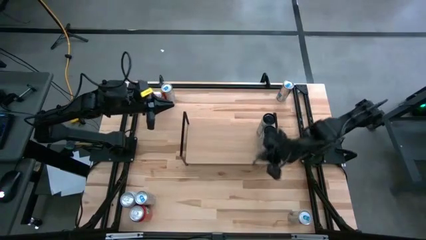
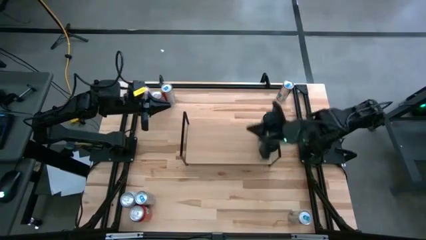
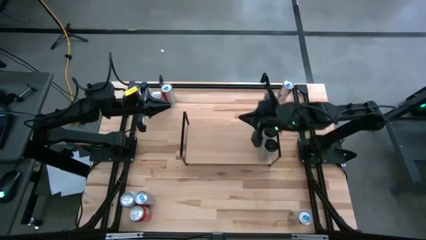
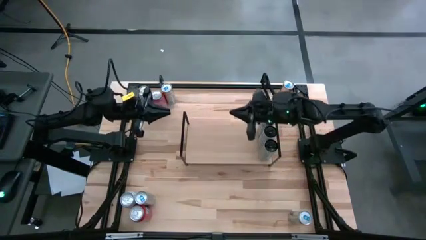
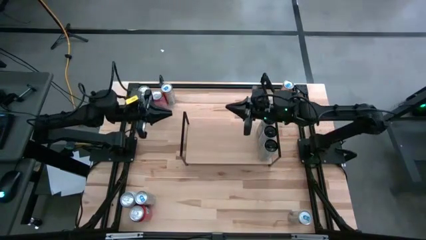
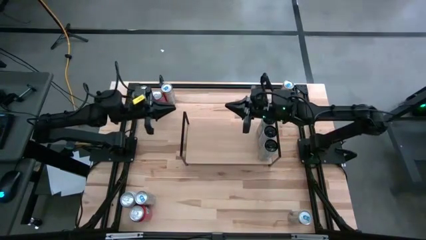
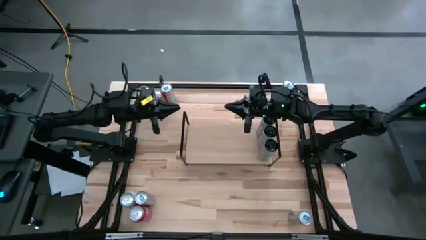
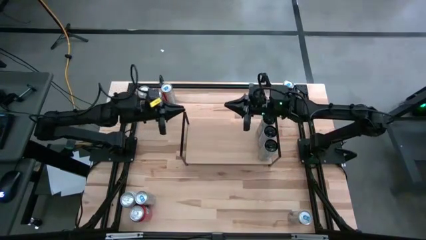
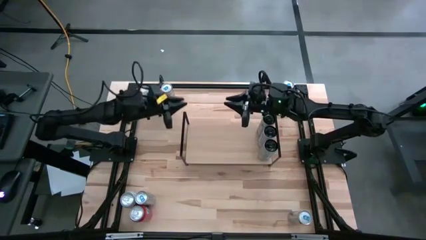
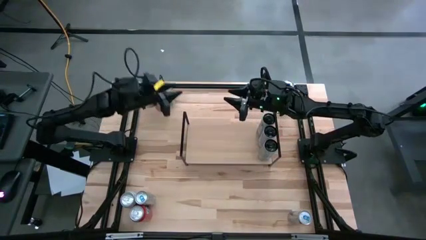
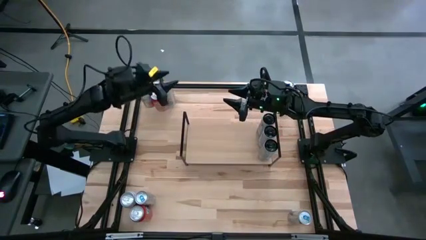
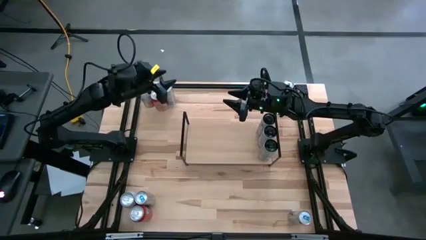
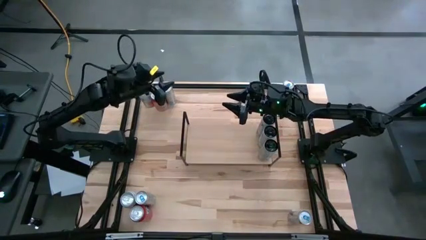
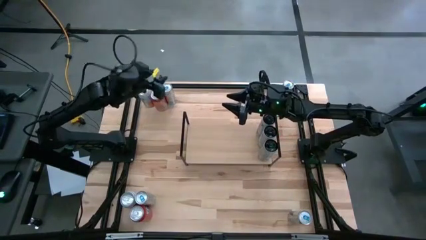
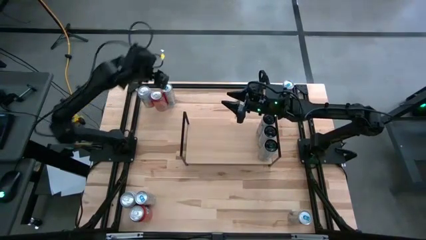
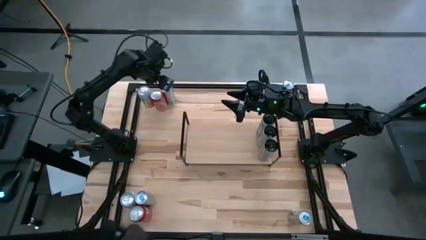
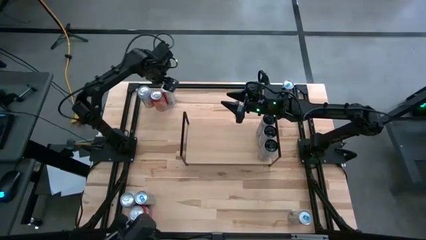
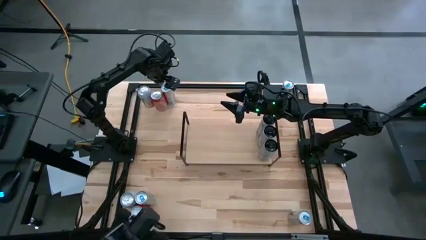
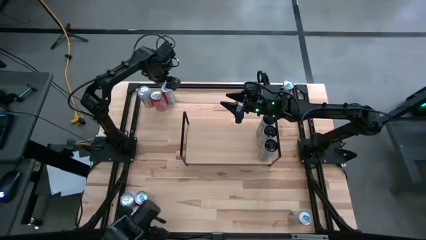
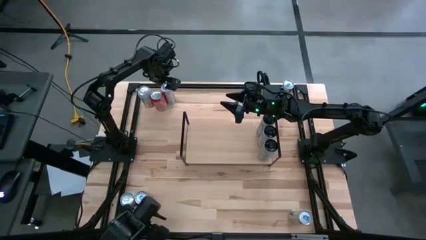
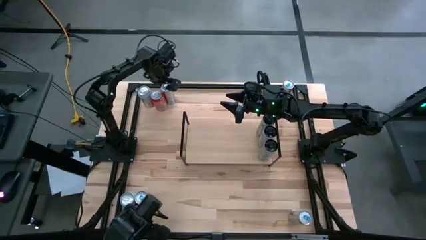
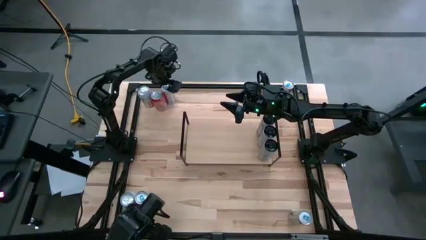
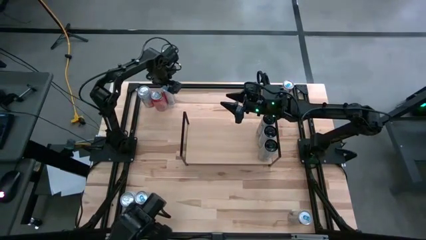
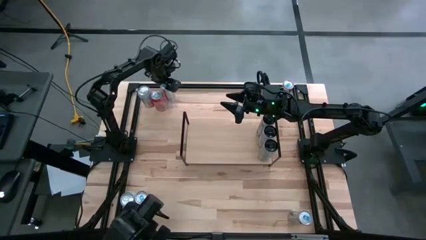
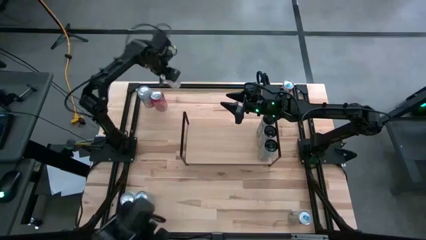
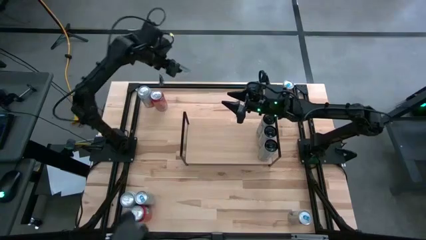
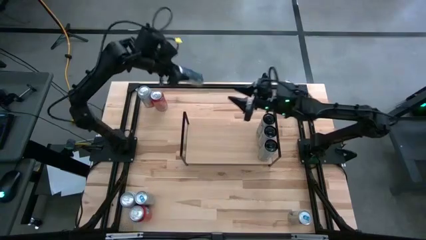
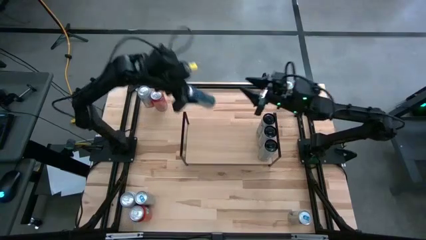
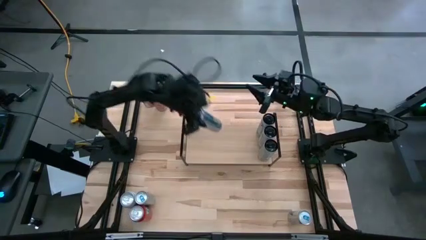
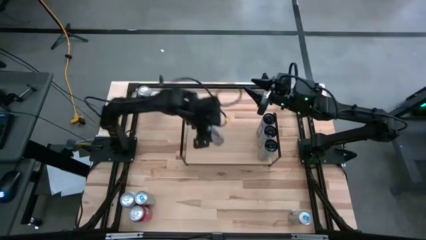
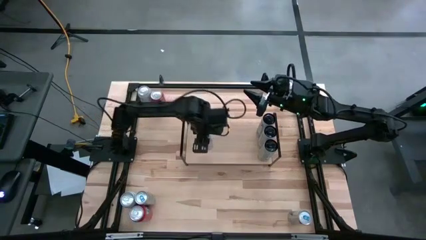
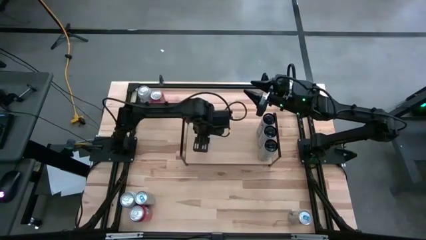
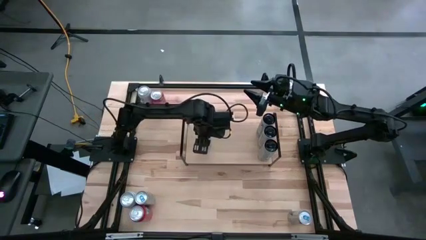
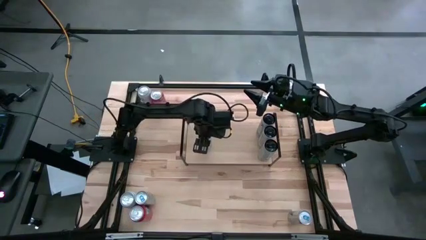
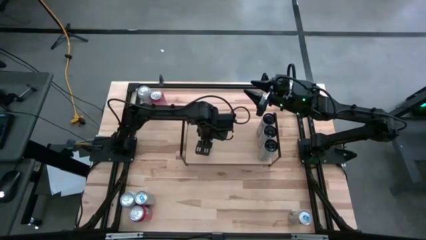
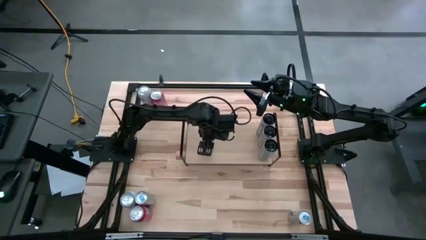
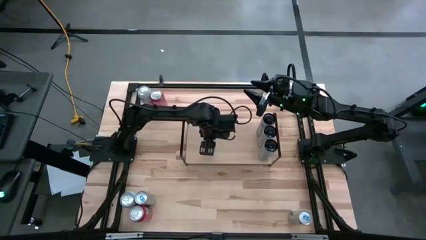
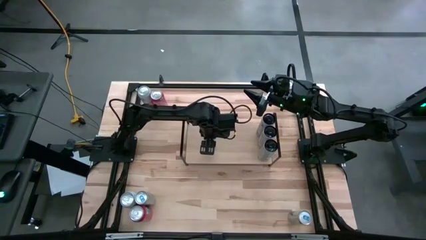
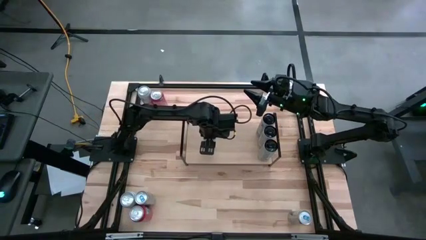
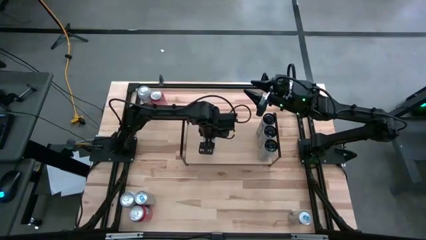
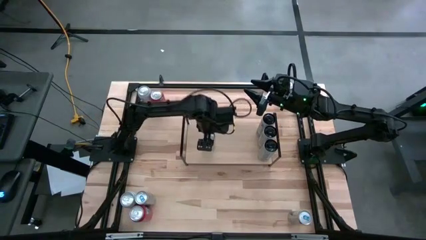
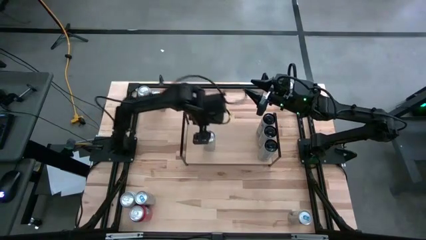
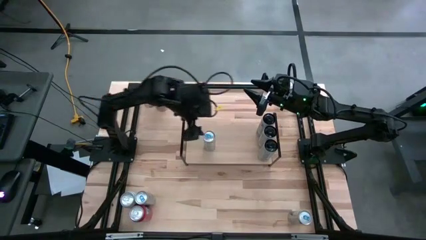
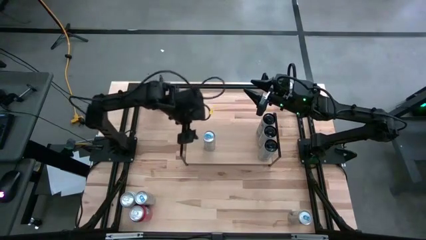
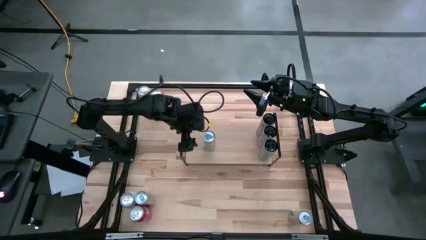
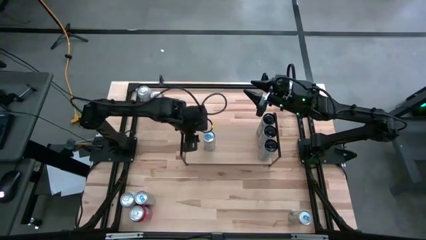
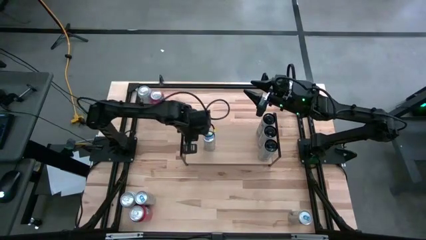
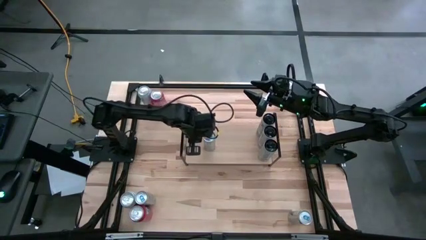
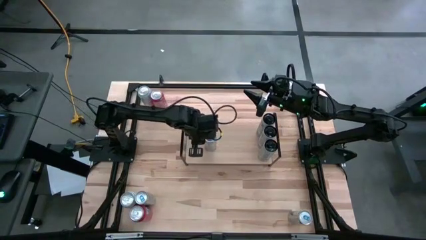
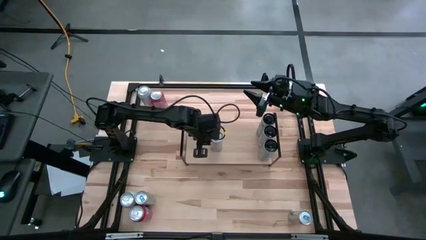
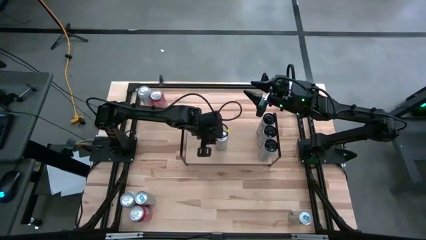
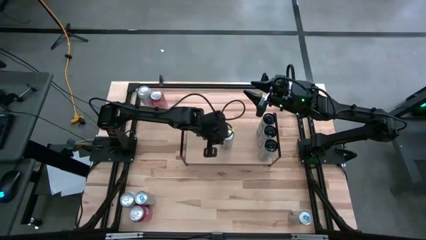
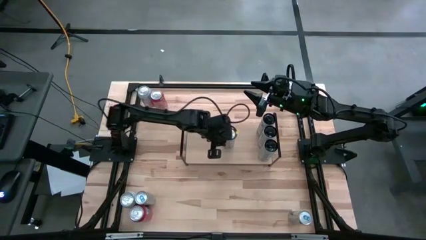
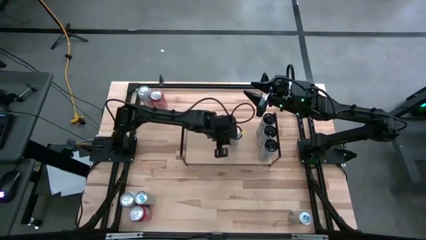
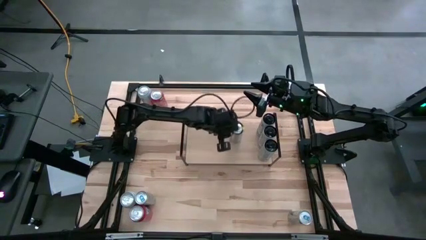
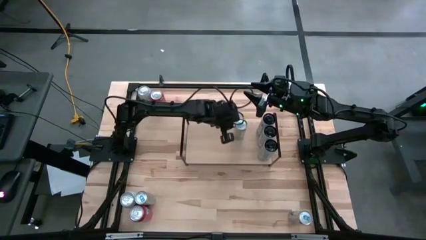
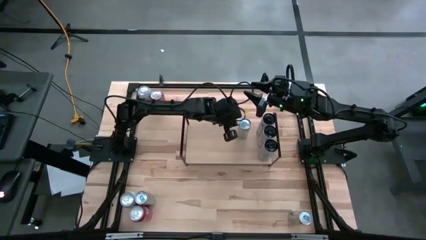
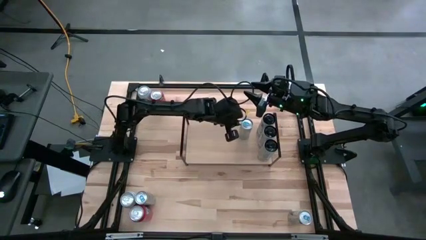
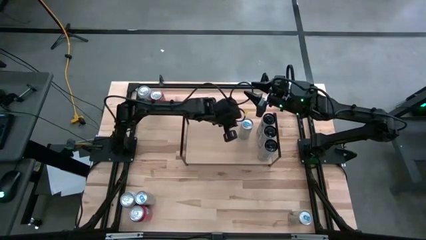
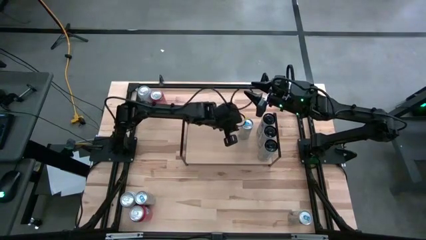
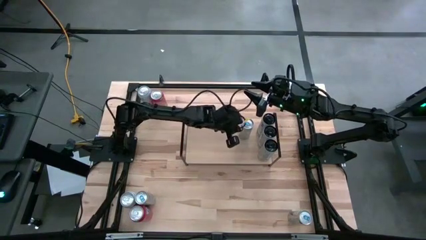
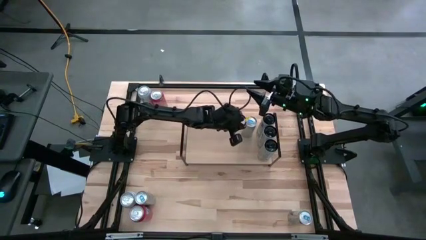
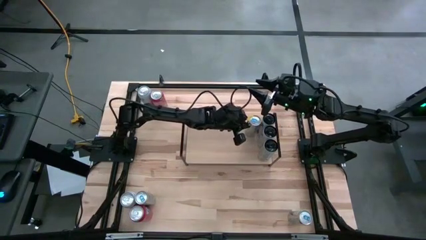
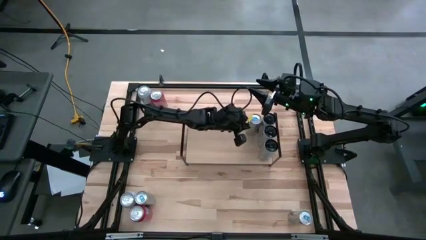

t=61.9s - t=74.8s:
Task: Place canned beverage on shelf
Put the blue soda can on the shelf

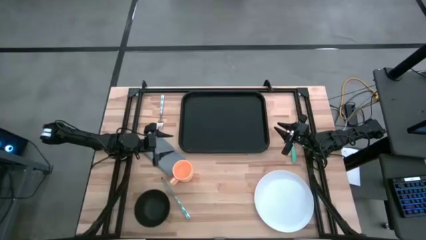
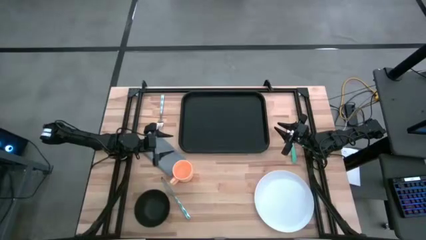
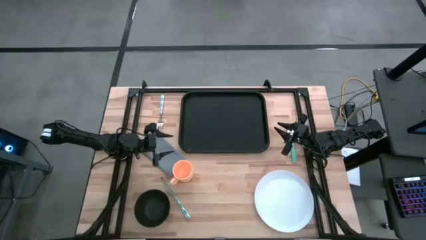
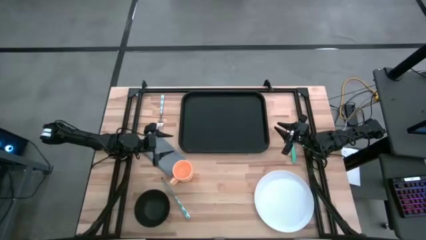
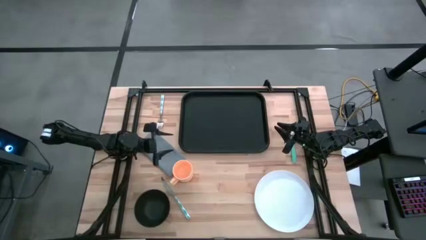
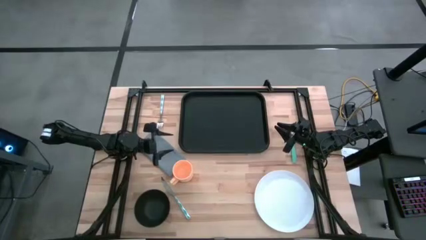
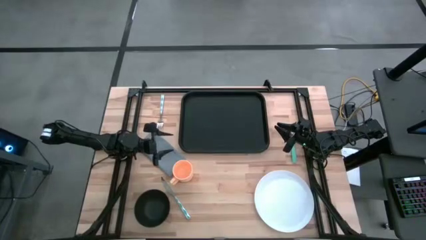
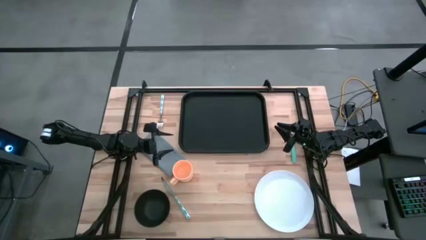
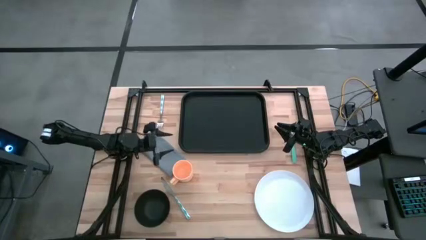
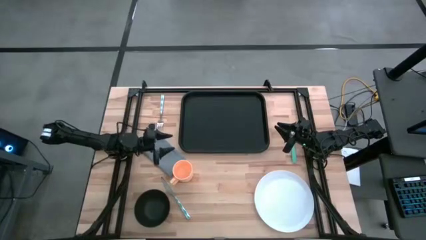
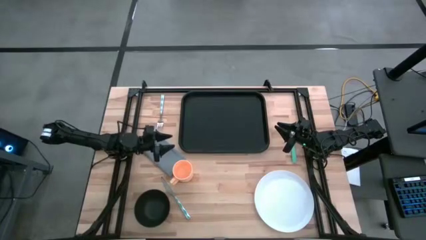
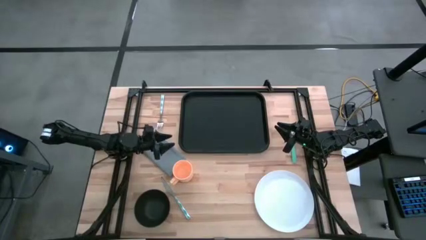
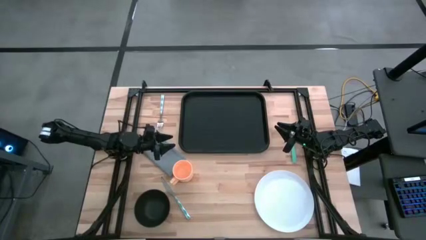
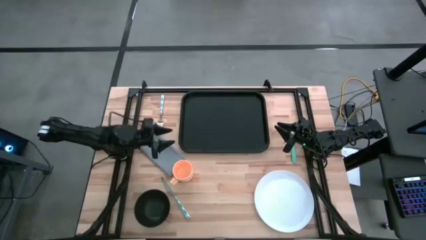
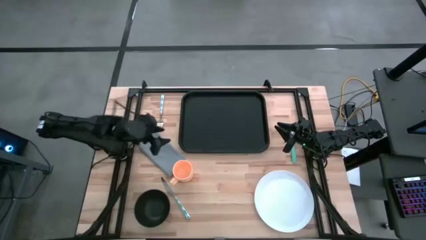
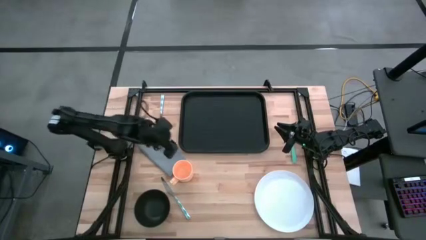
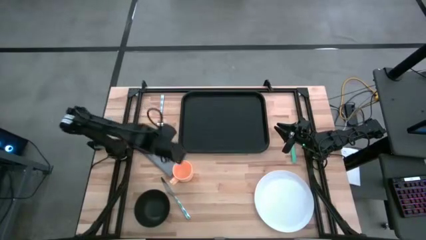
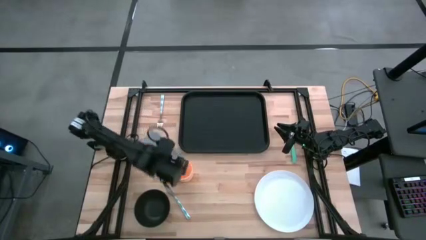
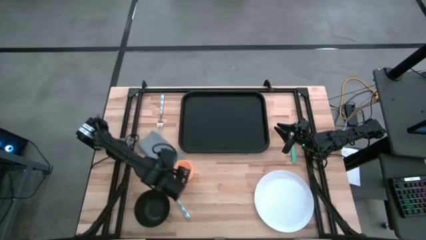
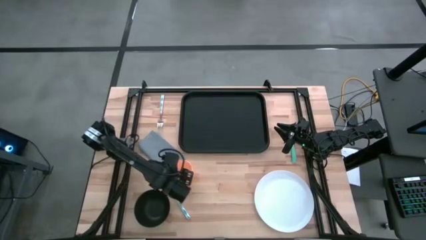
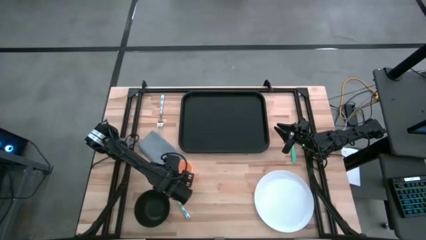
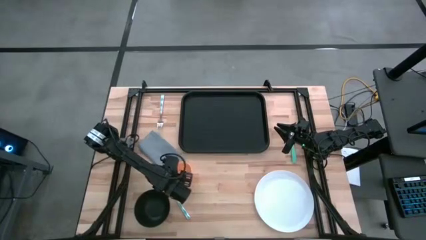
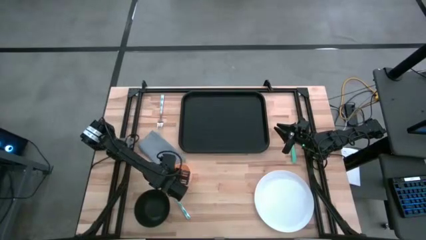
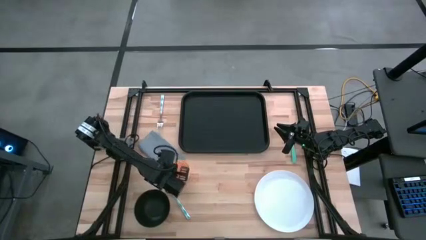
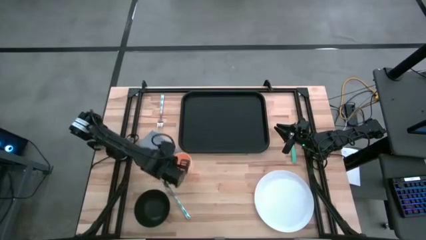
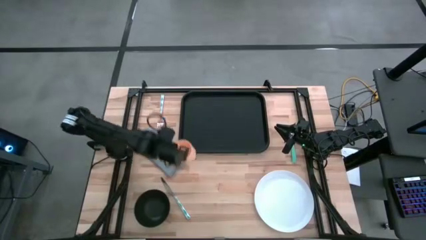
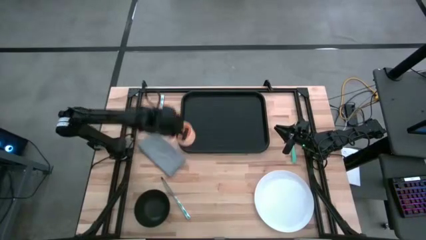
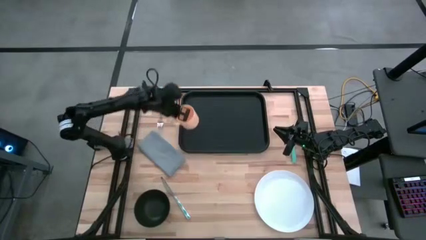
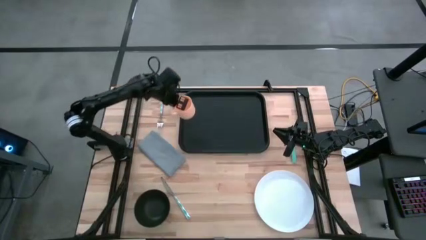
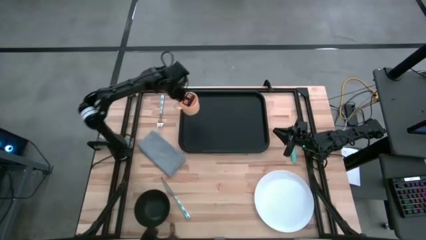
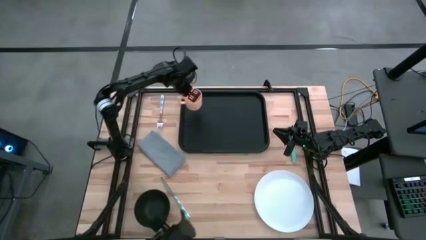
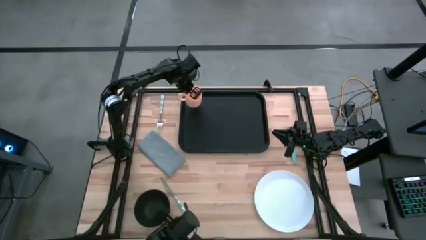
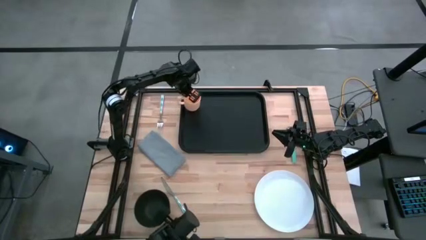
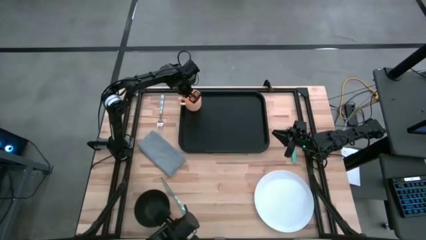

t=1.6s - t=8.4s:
Task: Set up tray
Put the orange mug in the top right of the black tray
